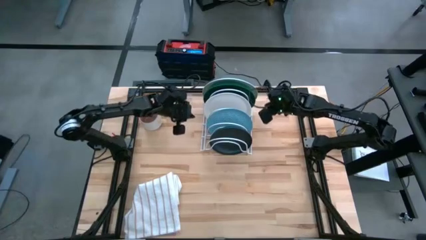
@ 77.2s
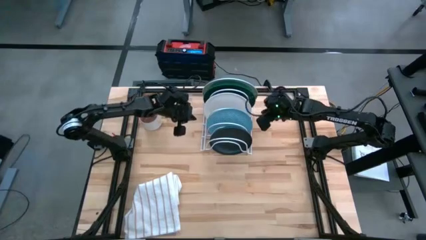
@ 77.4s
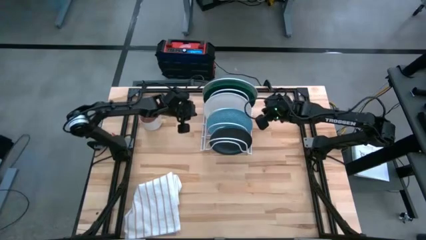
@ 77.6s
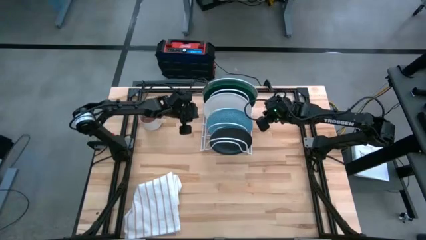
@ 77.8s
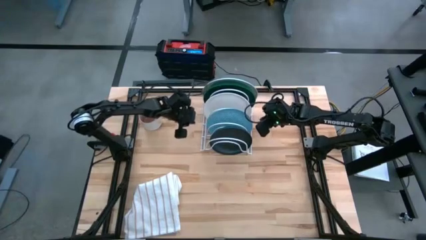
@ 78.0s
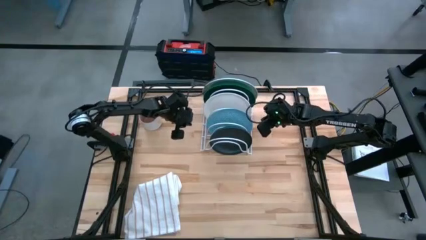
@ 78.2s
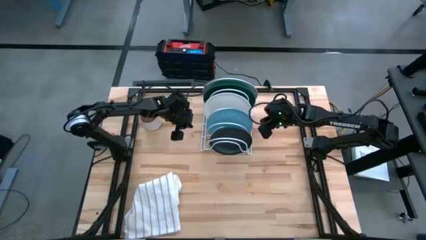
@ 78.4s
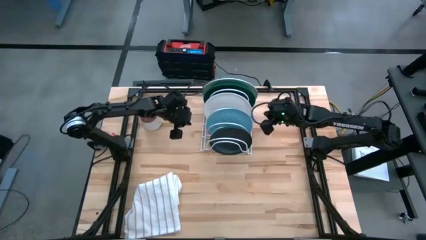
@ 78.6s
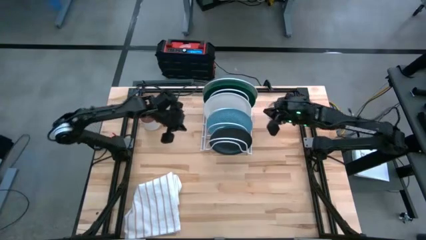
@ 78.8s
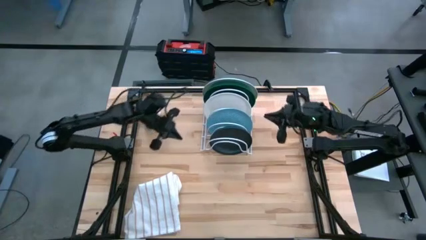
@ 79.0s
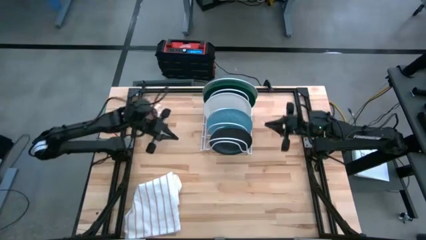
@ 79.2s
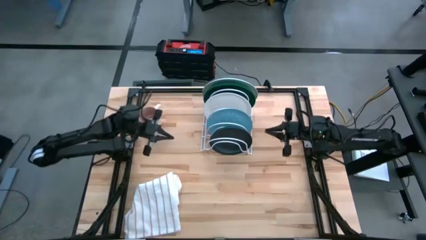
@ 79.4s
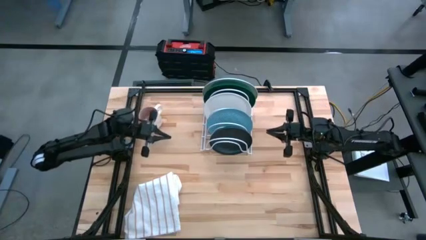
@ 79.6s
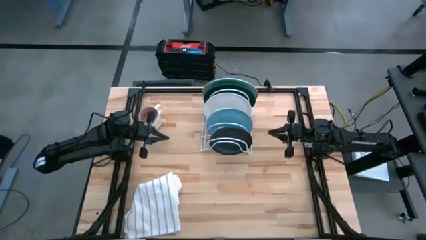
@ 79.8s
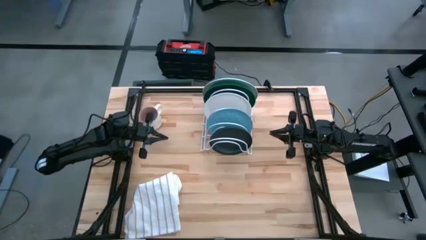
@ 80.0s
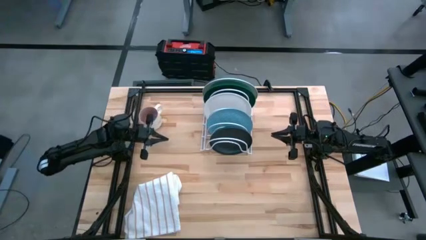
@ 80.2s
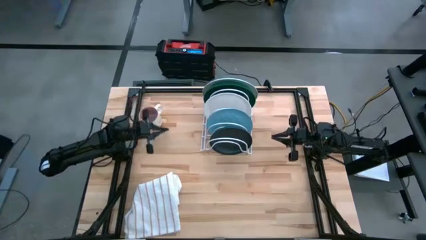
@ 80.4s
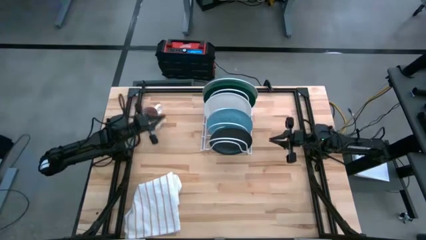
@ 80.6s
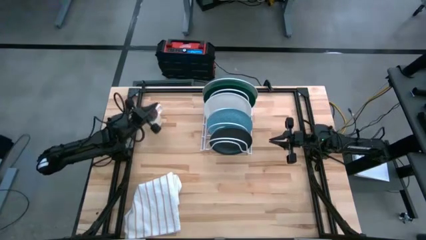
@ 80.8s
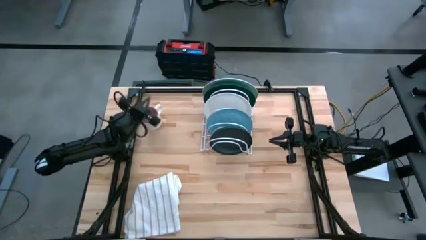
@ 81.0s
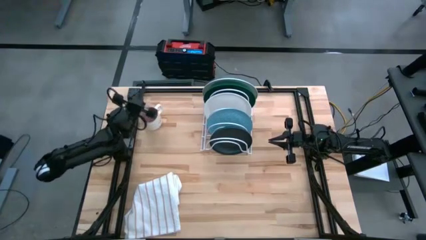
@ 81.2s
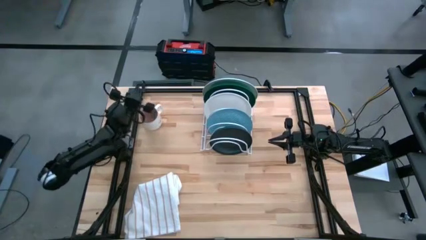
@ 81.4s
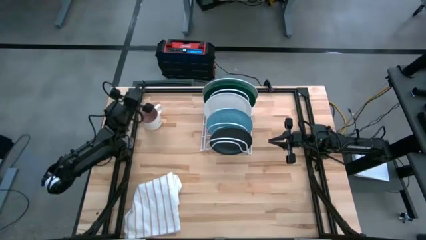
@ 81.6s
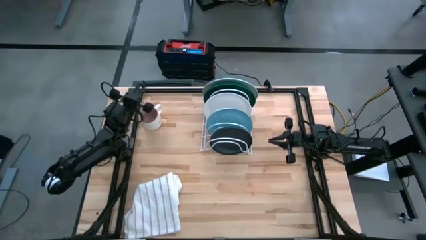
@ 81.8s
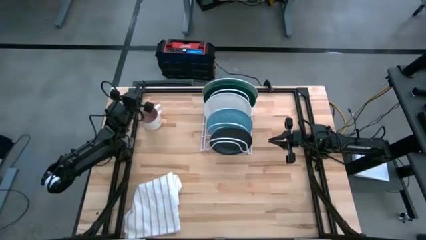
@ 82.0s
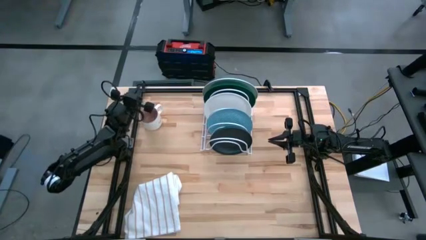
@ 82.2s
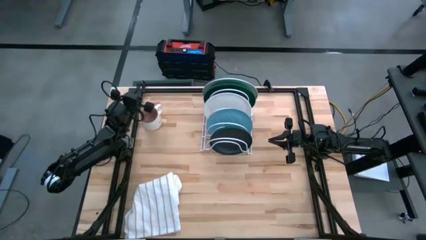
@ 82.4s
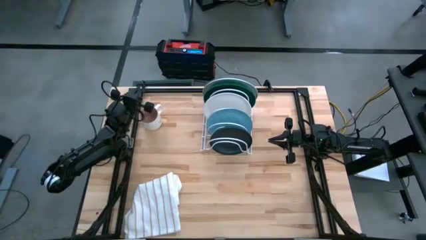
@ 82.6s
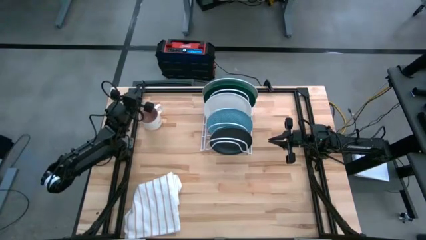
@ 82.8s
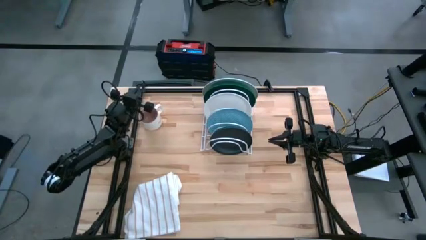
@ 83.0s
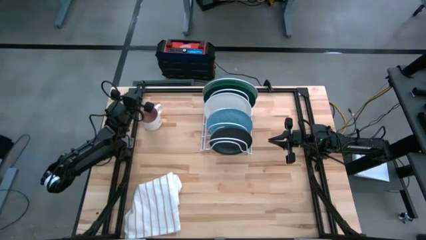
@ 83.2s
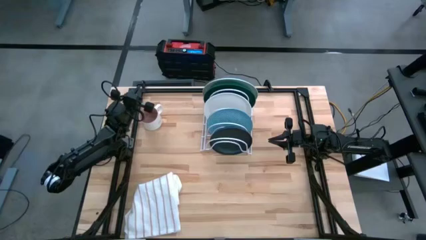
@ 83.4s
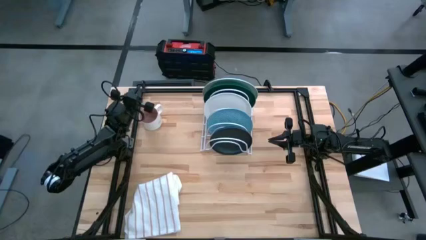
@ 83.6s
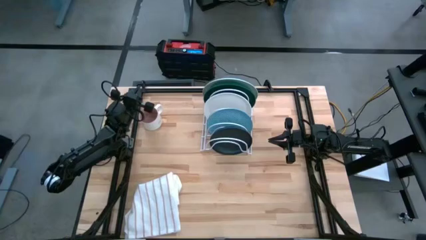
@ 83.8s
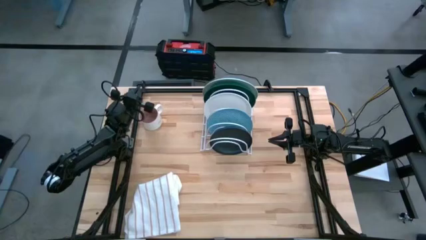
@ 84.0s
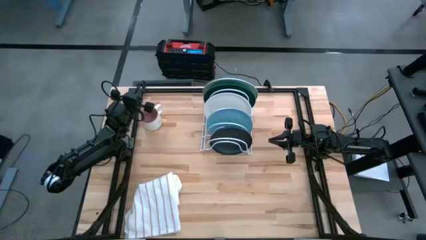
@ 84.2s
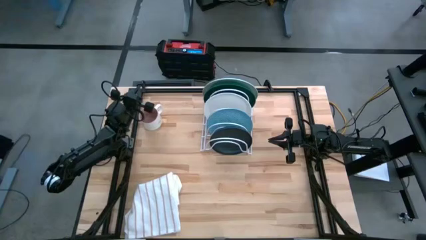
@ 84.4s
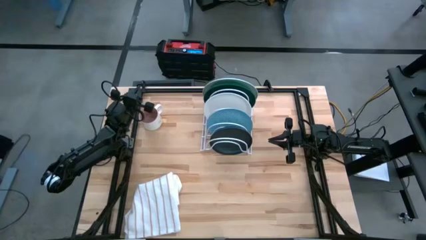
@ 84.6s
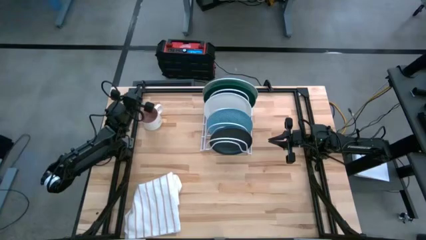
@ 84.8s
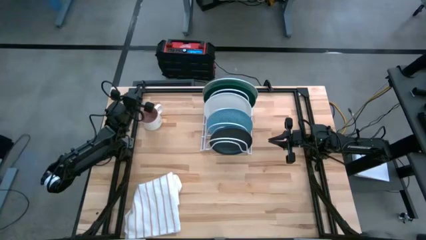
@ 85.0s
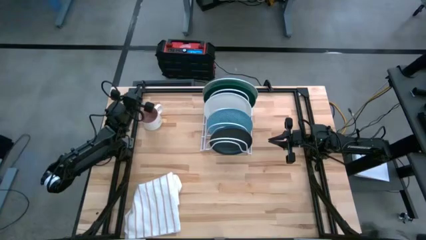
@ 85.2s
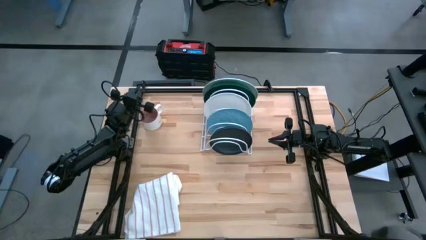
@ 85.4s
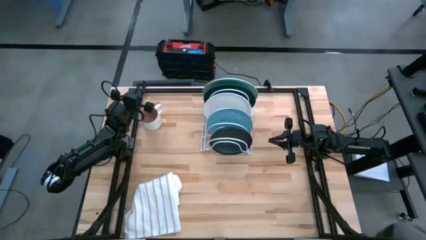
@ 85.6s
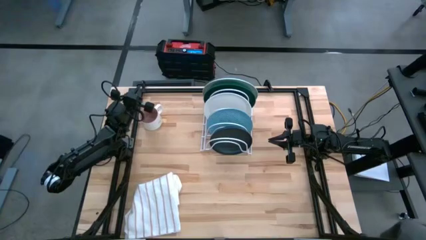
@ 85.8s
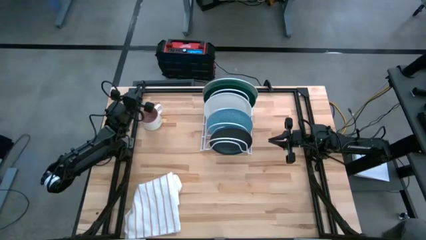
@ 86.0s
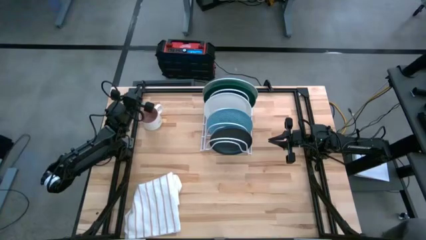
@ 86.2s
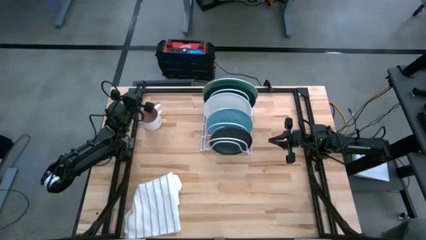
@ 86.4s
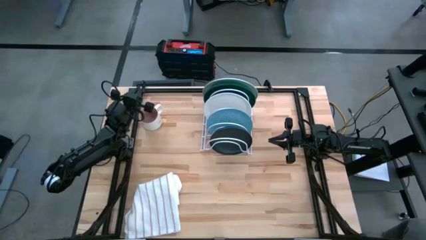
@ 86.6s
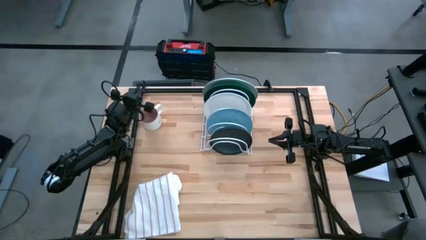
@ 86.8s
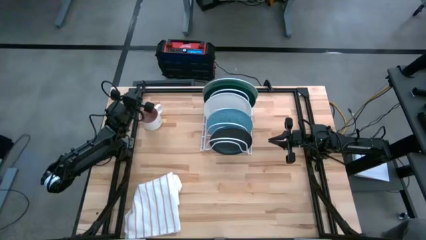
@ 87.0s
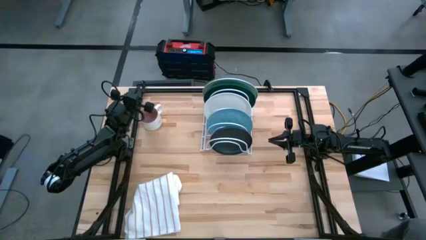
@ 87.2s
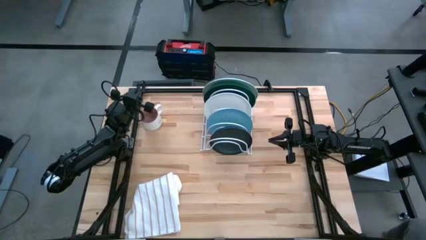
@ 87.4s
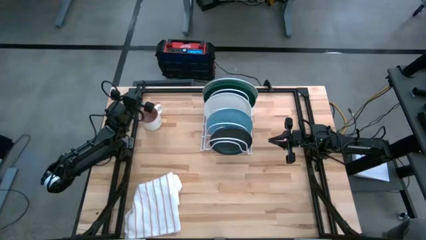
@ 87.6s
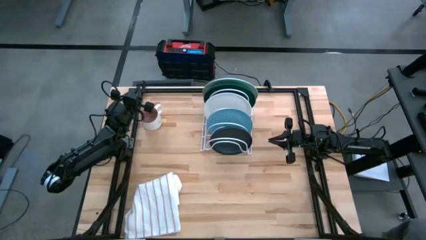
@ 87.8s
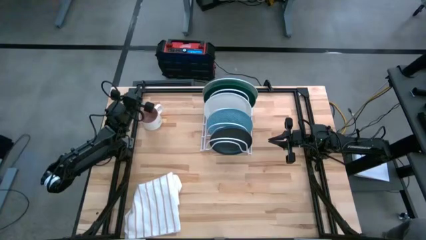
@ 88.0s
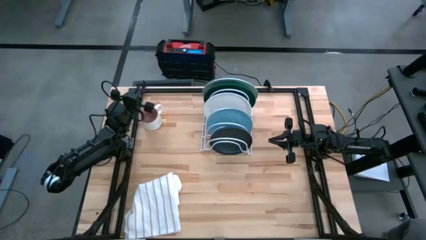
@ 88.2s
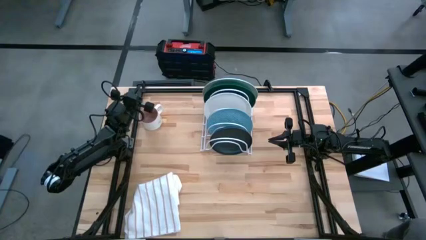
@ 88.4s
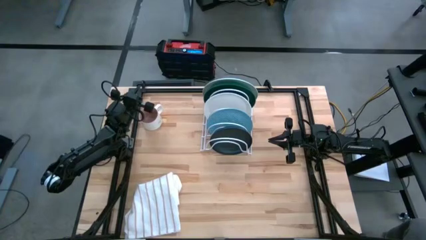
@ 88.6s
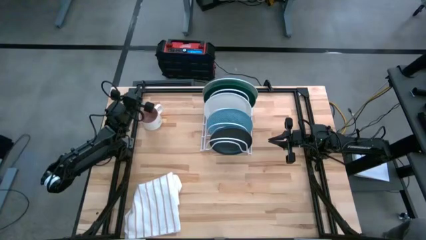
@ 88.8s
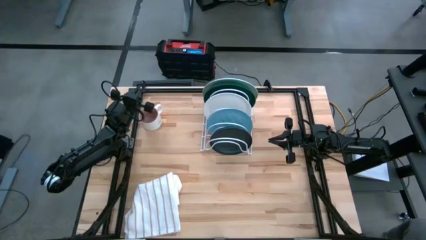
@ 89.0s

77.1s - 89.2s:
Task: Sort dishes
Return to Home Position

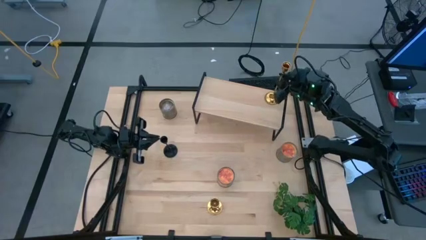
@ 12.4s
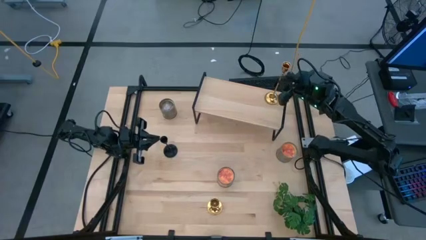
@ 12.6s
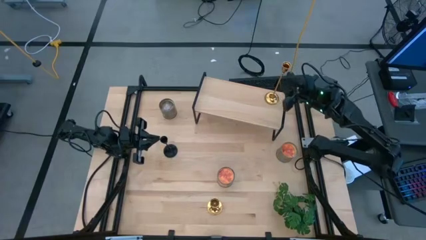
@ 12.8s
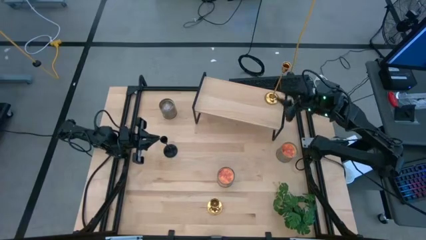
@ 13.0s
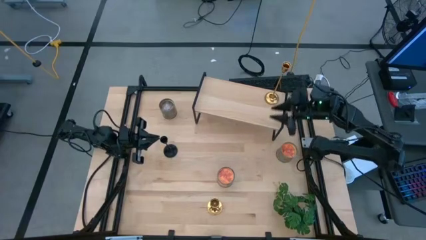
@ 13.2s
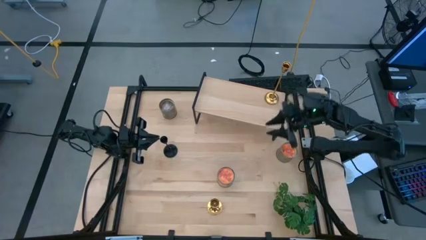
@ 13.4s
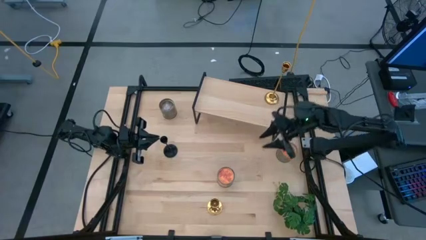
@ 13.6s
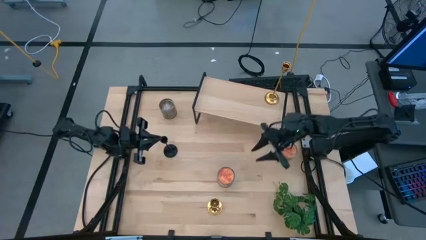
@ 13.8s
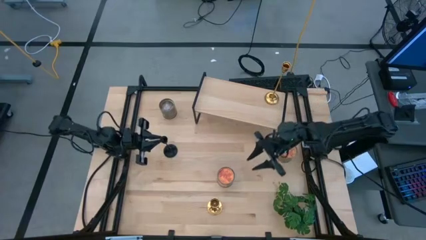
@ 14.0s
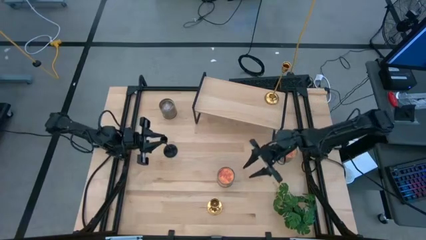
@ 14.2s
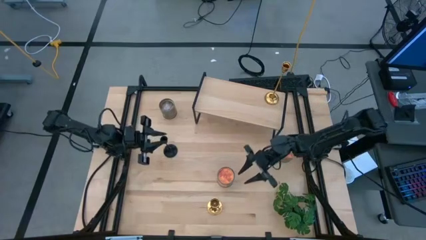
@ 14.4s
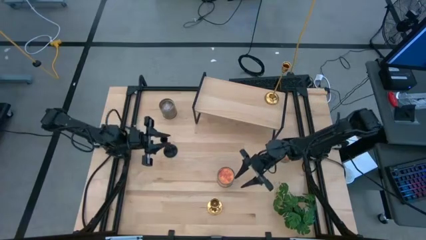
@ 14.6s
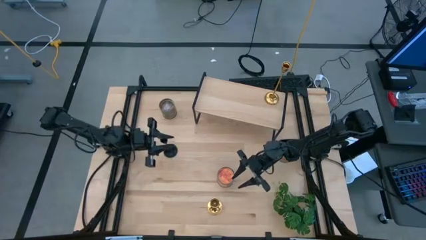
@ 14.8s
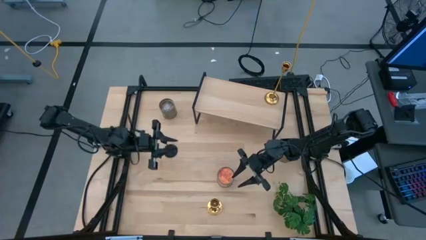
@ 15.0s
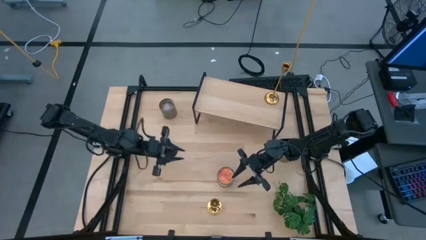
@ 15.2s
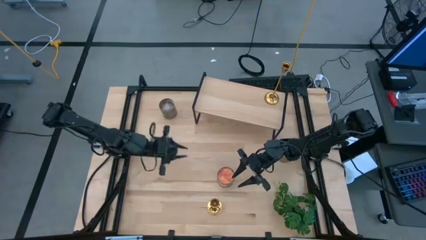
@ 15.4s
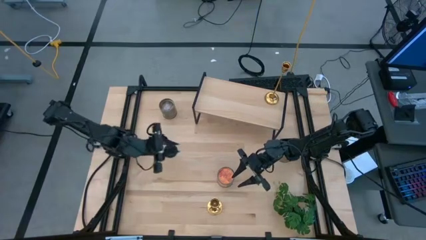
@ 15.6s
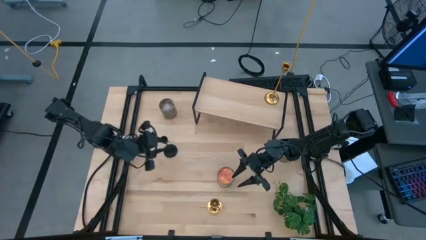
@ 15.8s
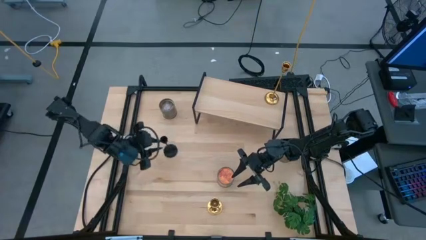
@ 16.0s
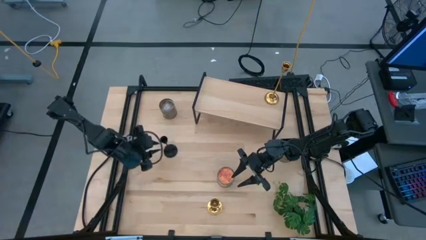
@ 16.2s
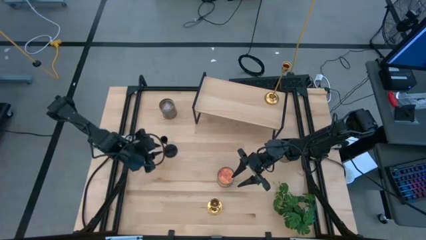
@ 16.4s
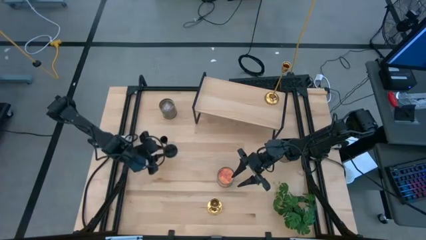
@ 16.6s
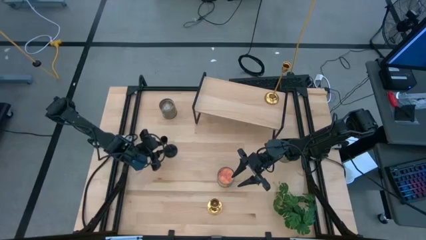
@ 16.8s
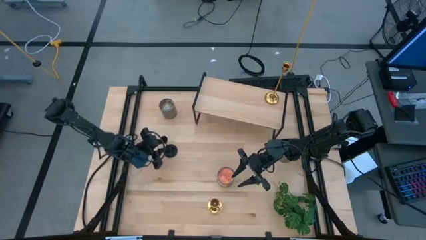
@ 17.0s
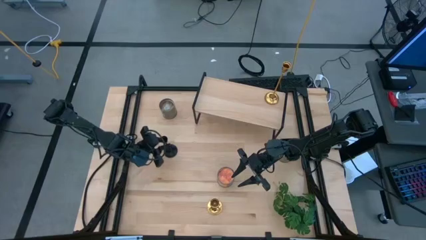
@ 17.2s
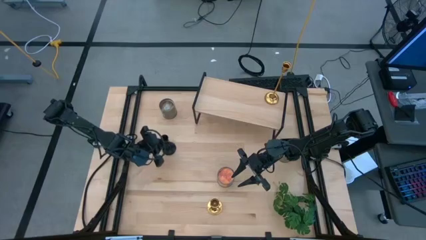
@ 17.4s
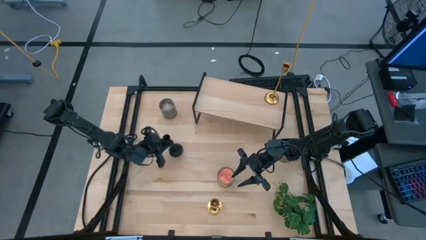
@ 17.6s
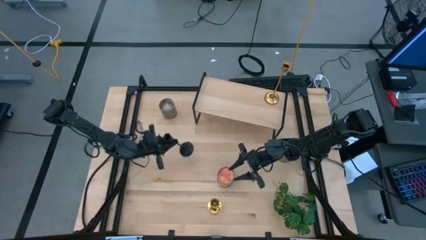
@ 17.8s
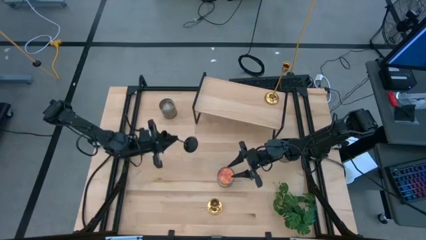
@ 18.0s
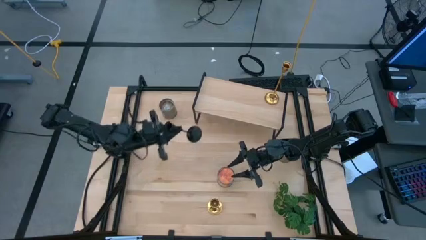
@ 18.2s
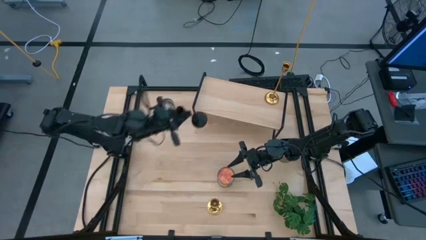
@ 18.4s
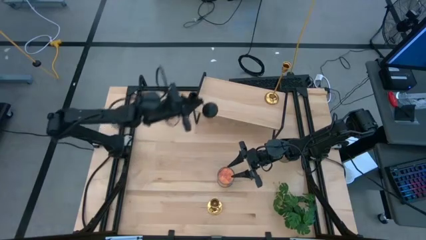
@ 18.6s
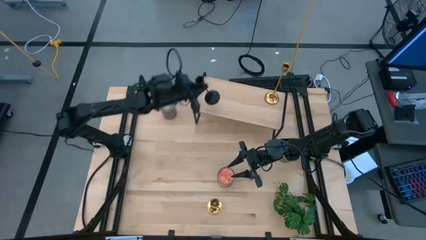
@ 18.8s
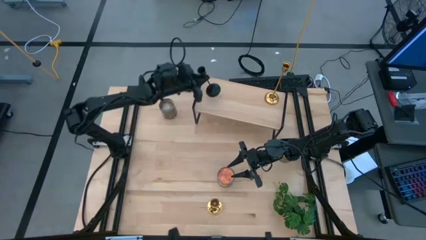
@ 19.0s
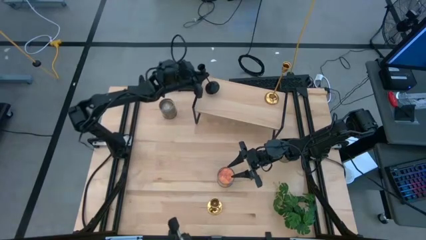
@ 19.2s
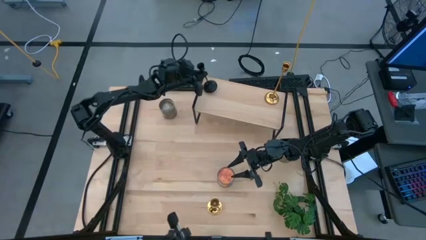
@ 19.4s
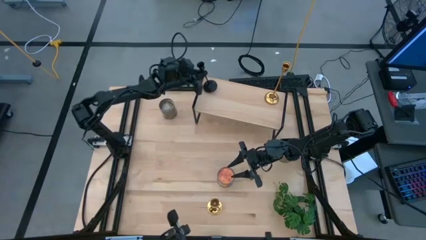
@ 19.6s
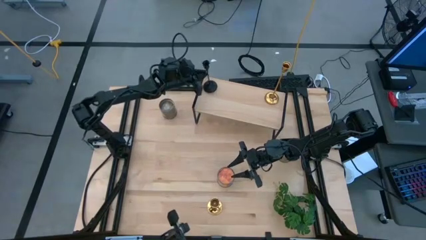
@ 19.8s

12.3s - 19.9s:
Task: Pick & Place candle stick holders
Put the black candle holder on the shelf
